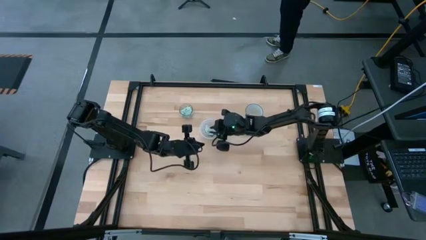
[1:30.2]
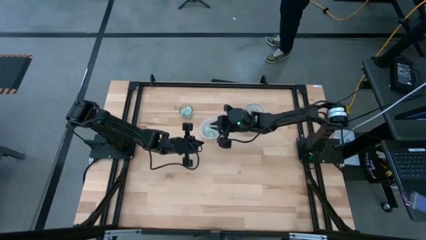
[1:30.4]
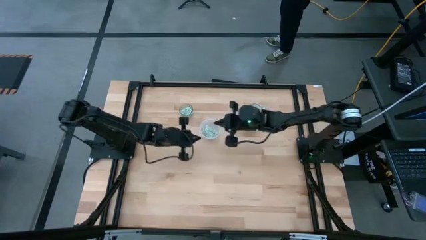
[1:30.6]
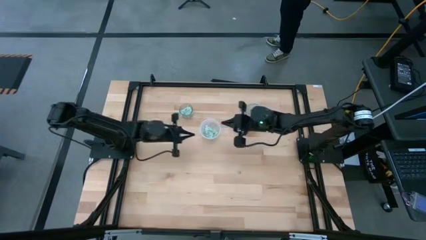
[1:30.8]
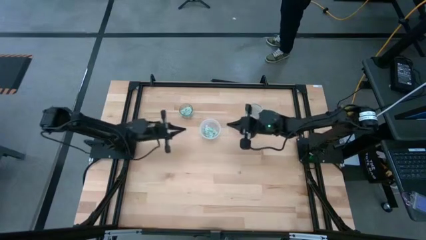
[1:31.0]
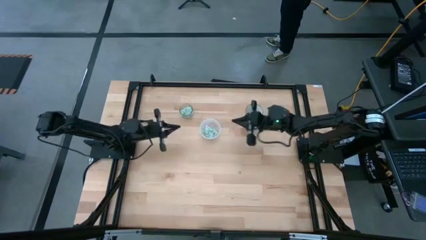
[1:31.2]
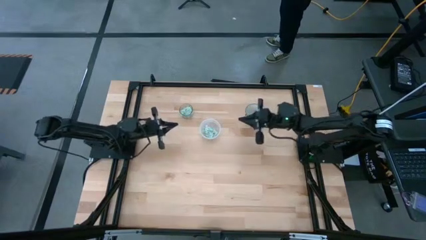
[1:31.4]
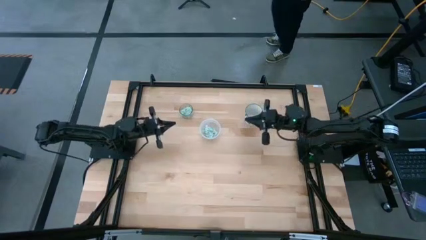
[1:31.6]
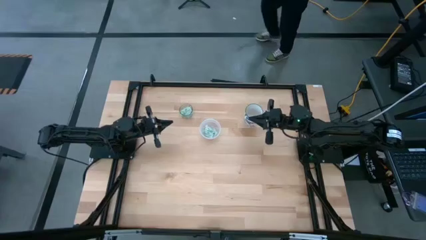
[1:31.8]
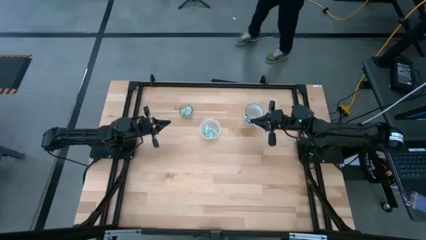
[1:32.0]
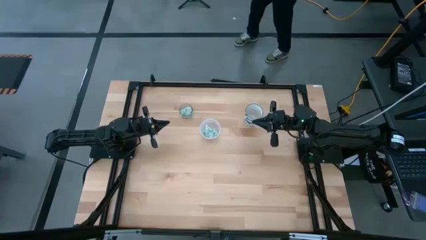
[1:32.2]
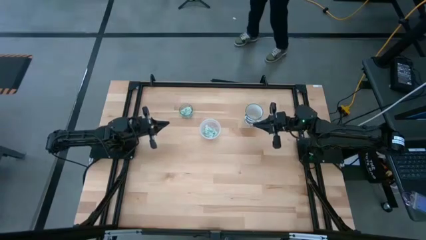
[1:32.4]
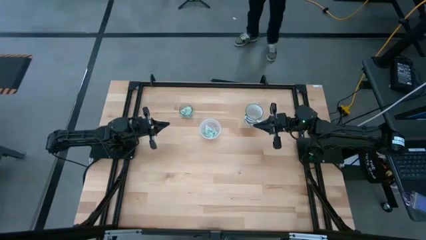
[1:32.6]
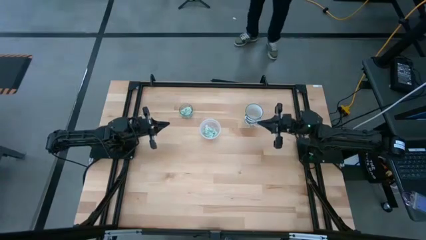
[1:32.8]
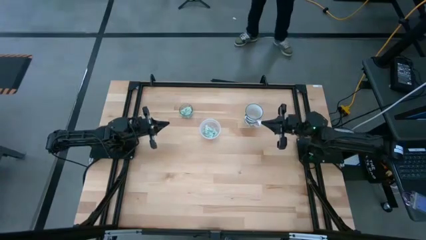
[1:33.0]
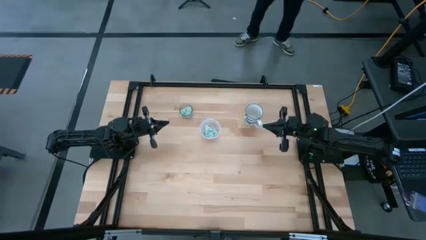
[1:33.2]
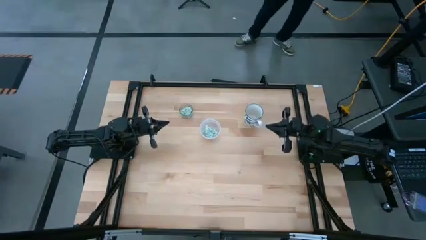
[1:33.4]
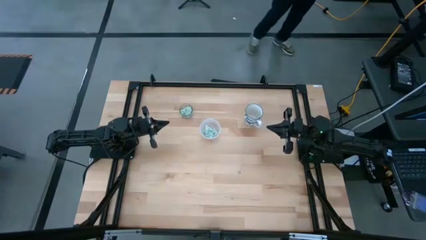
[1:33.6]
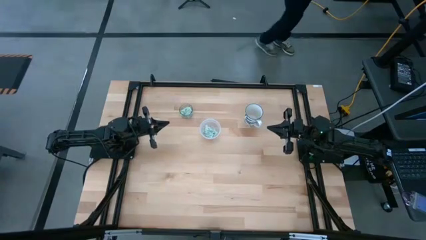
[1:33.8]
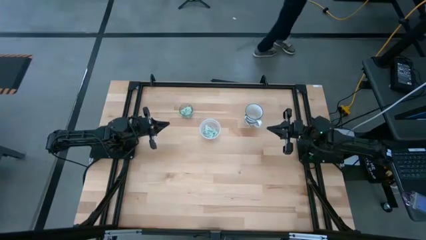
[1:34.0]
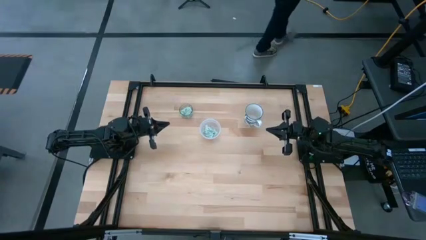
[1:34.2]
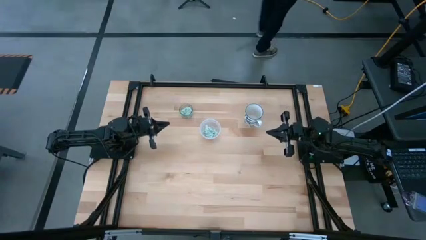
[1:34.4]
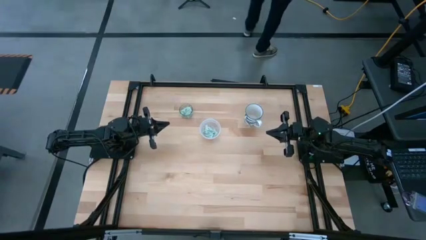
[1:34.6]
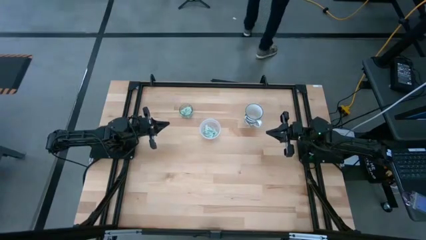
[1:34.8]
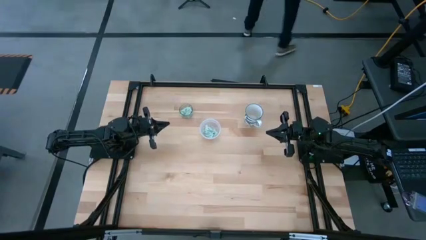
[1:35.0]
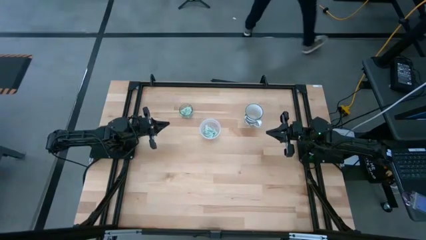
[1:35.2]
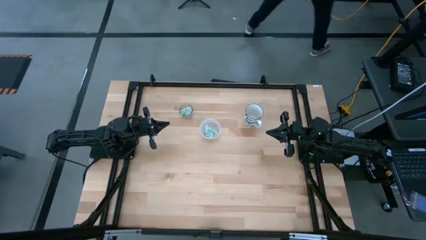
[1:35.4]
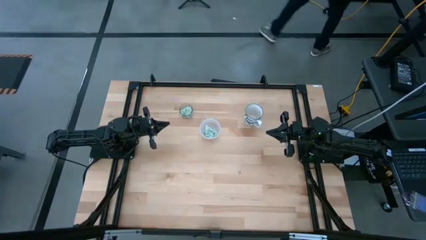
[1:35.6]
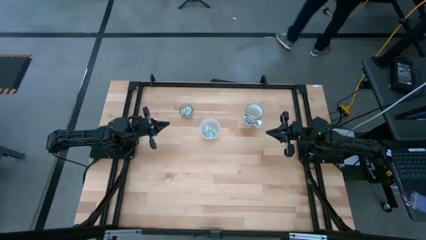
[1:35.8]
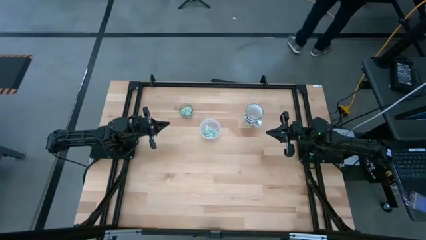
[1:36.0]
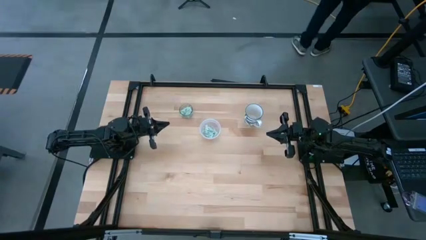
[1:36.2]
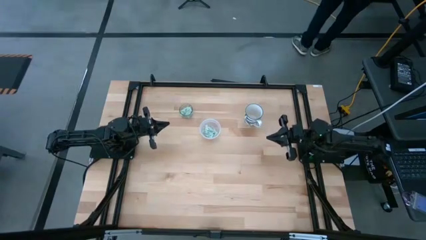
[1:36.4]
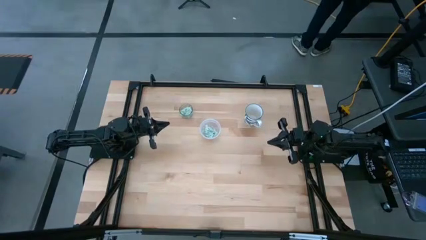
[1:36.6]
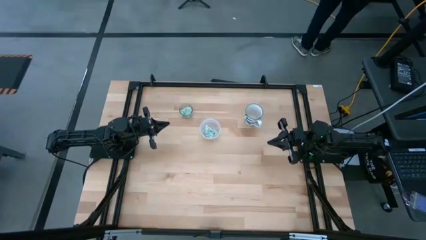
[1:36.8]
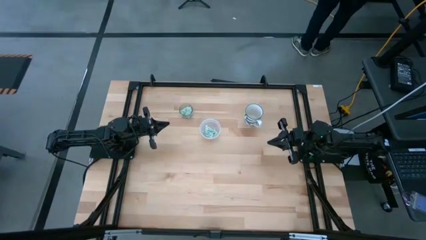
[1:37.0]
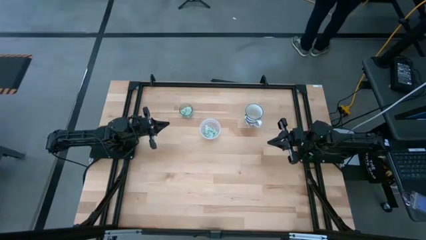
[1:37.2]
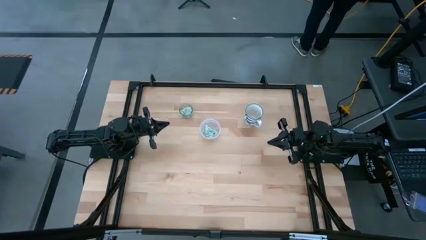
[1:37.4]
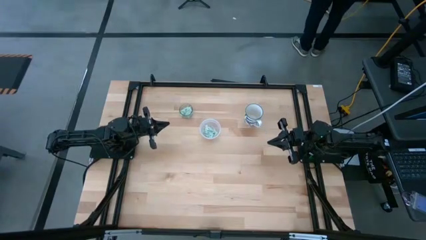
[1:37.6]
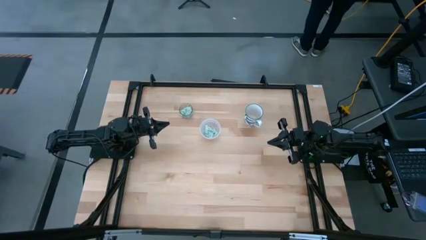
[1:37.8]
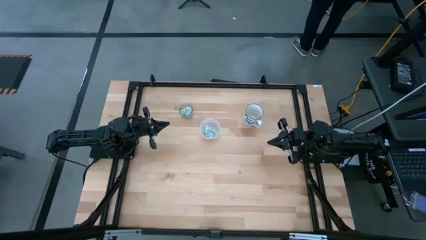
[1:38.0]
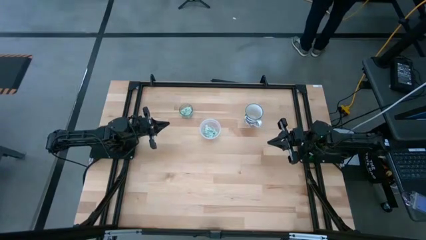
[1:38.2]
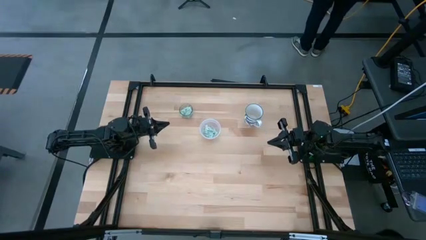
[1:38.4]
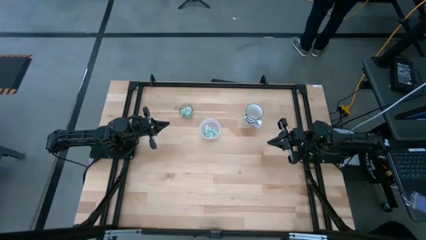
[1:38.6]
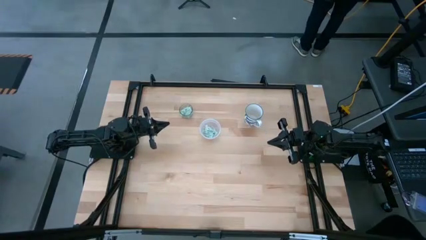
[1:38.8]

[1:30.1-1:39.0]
Task: Pick and place Stevia / Truvia into bins
Return to Home Position

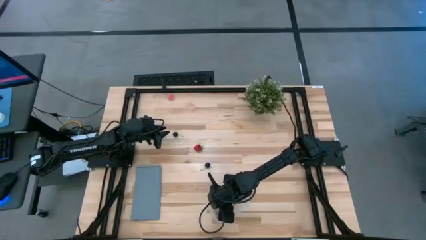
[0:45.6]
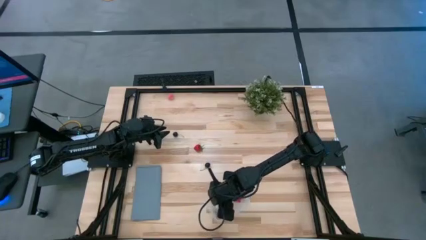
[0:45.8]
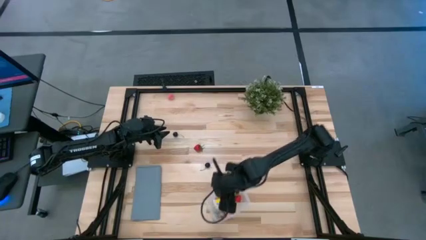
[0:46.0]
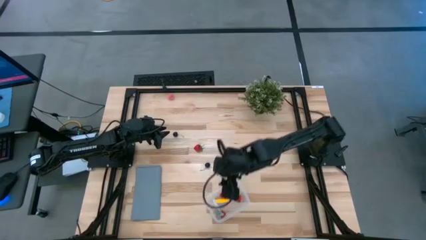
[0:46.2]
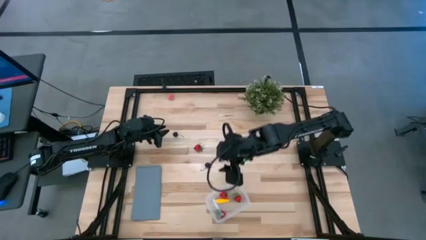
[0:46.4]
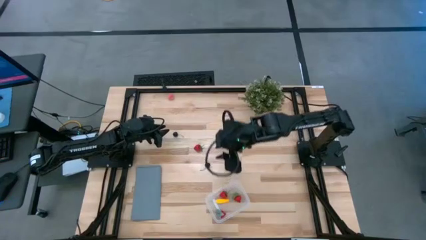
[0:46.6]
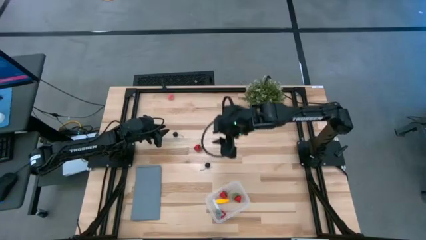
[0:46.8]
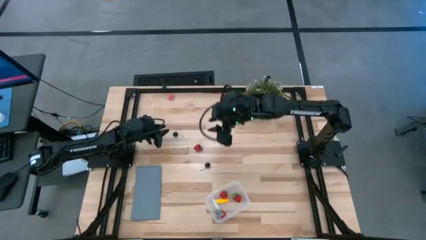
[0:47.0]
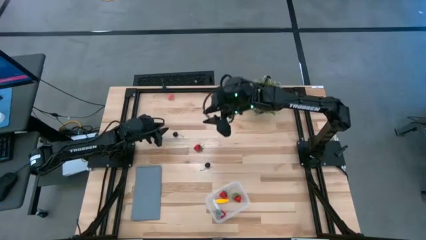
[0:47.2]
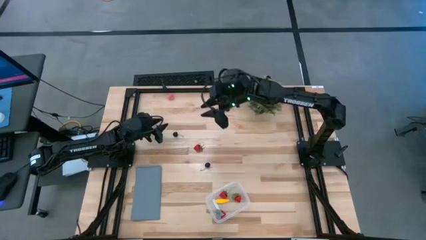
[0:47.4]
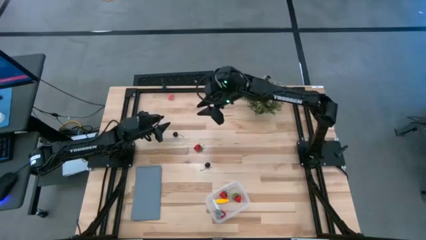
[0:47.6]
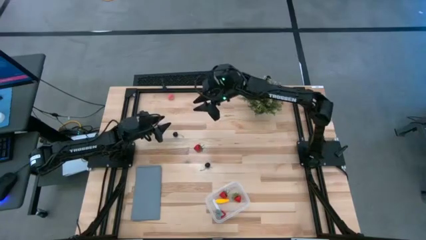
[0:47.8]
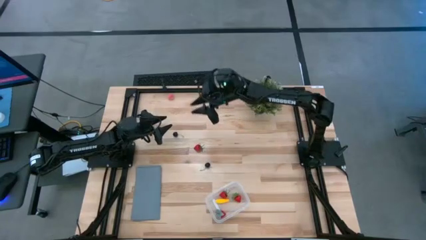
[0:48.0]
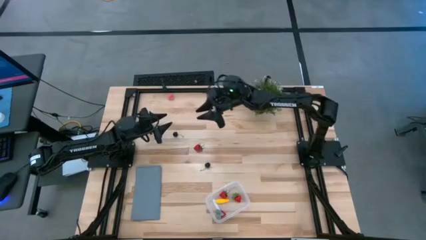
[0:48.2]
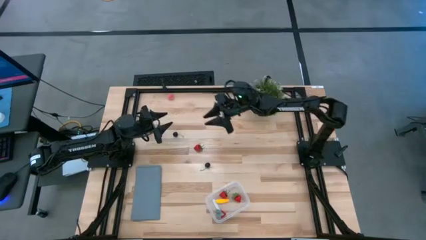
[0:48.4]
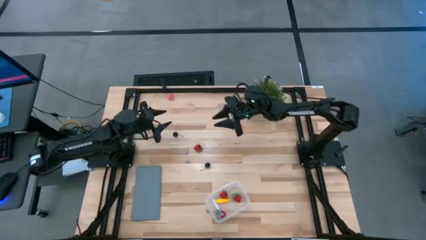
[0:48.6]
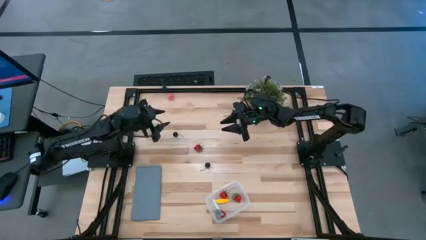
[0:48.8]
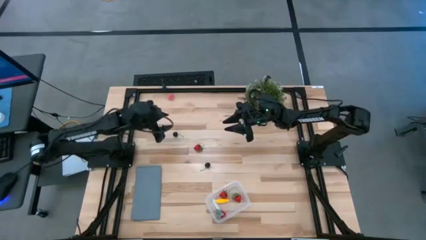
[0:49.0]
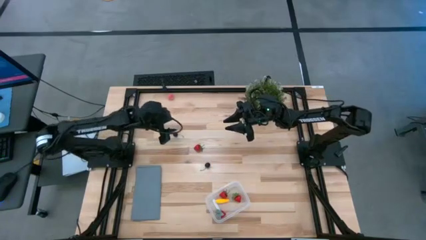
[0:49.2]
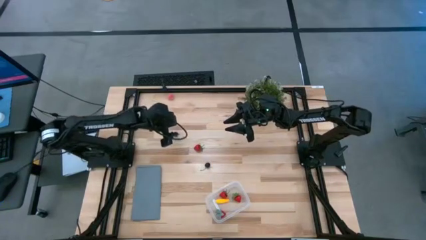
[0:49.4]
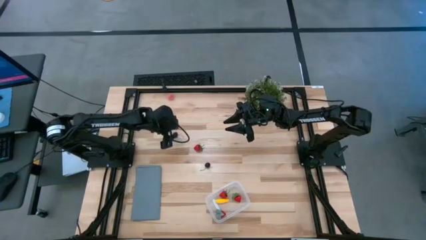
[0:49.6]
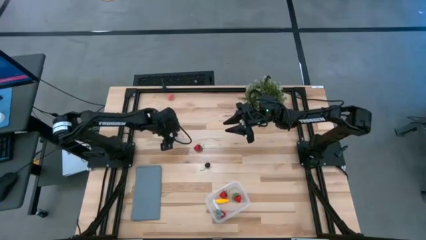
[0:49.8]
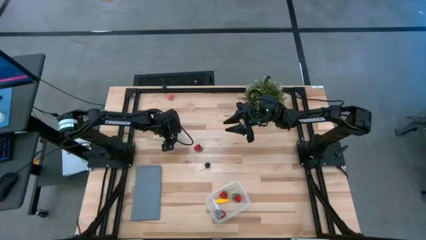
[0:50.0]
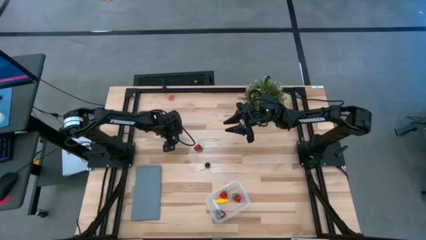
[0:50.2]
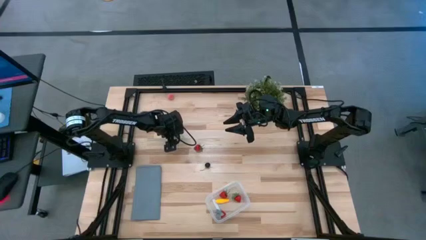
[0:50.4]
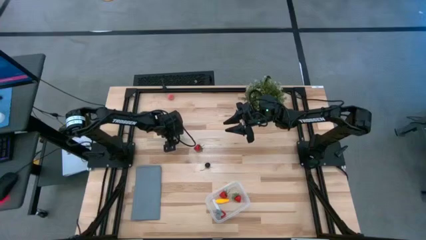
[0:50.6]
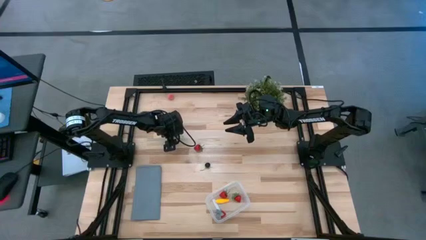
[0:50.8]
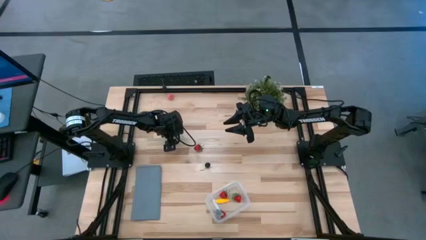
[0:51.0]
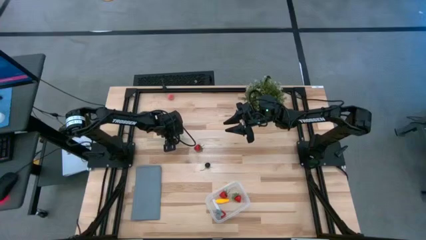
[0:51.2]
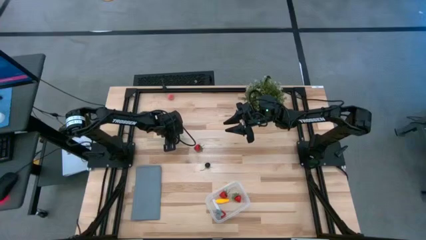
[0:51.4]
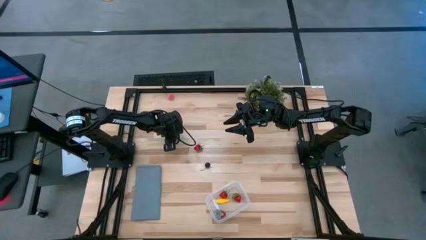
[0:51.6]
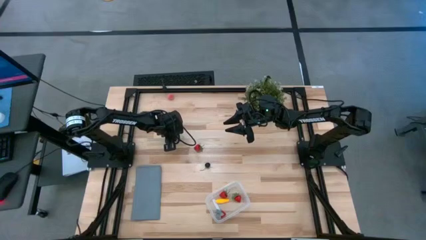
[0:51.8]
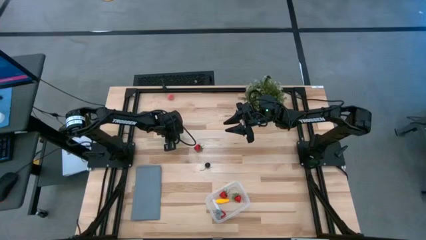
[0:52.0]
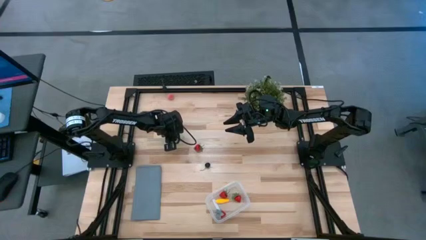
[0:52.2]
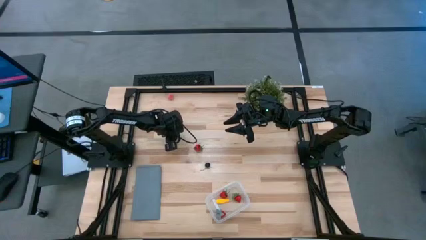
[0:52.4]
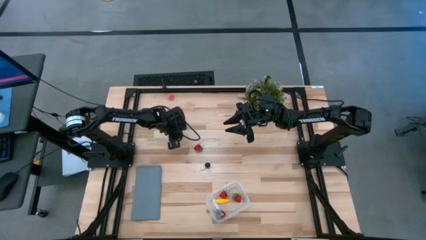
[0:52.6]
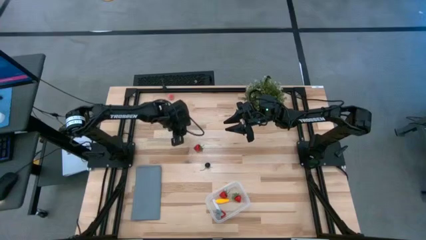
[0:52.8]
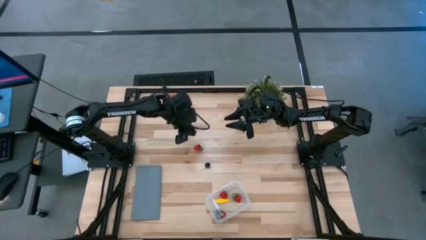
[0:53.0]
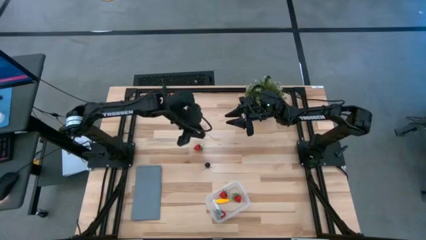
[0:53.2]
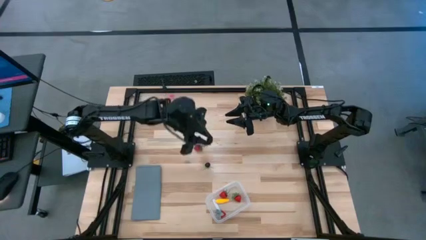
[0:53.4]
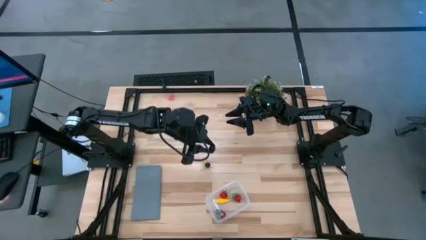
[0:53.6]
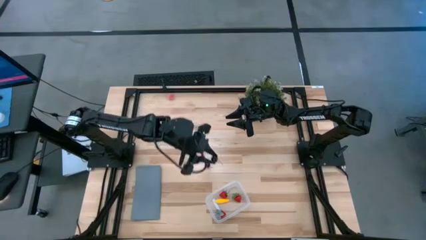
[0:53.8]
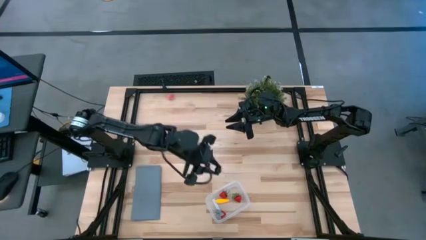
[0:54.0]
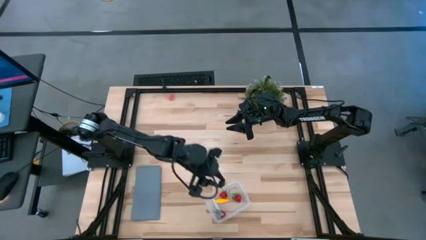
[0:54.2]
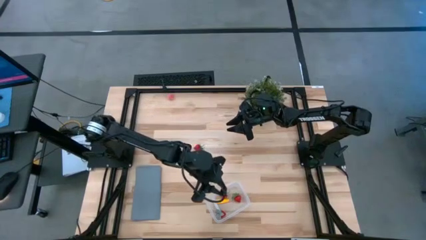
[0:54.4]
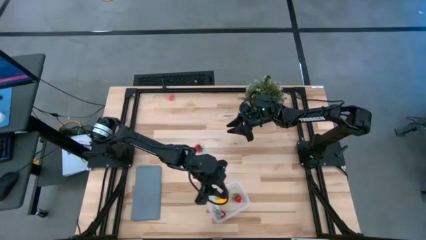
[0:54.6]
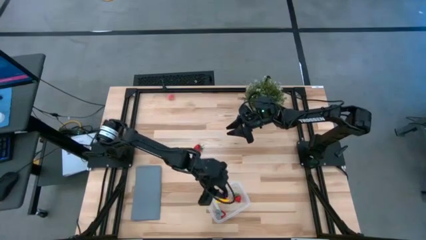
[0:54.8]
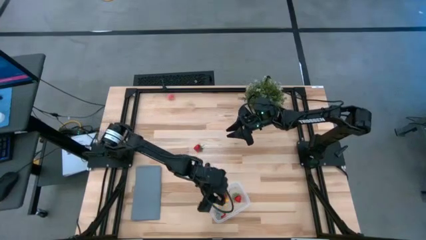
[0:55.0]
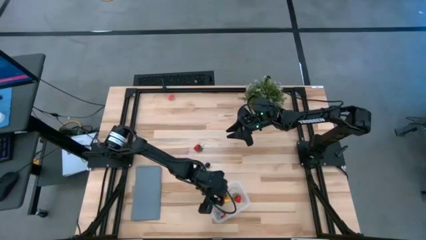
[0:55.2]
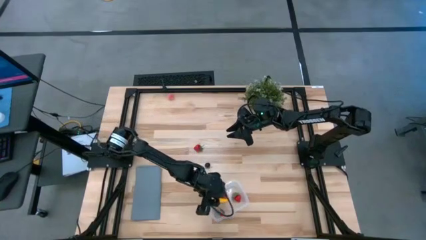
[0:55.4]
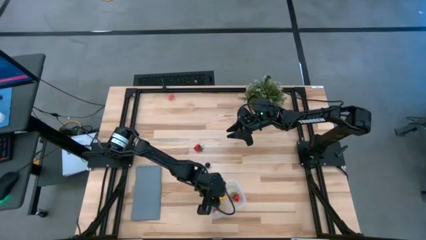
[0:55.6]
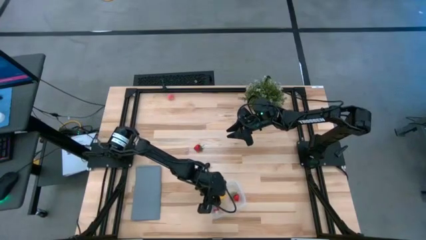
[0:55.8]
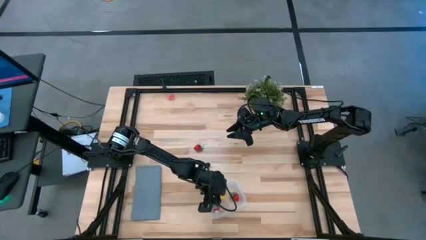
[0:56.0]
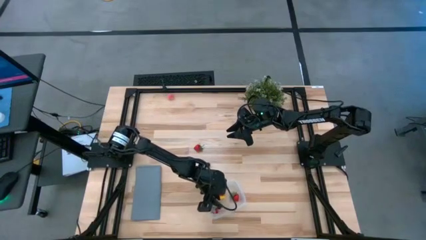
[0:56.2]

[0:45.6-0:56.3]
Task: Pick and placing Produce into tupperware
Put the top black cherry into the transparent bin
